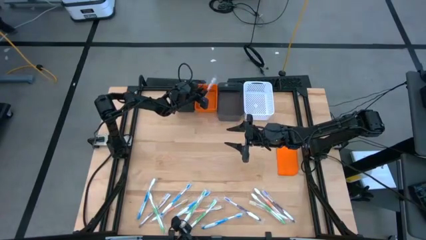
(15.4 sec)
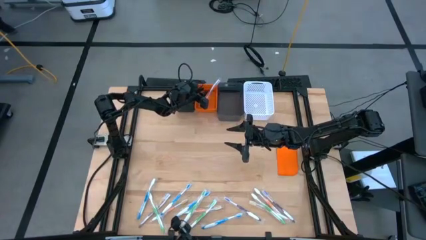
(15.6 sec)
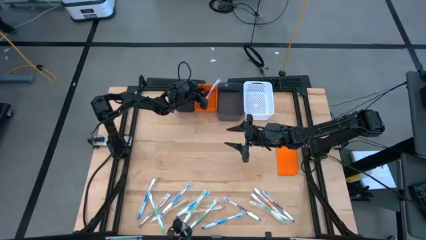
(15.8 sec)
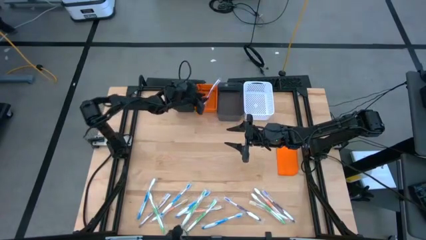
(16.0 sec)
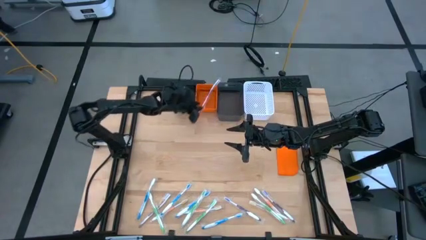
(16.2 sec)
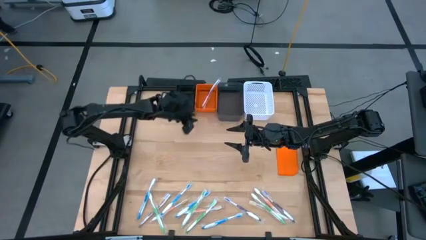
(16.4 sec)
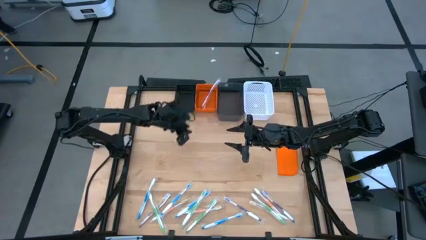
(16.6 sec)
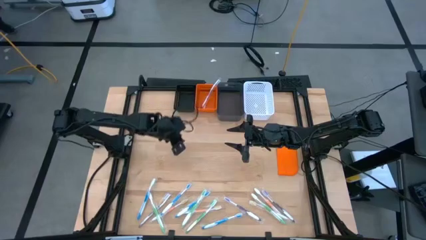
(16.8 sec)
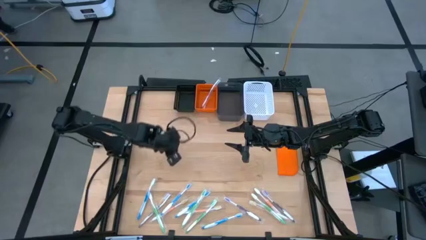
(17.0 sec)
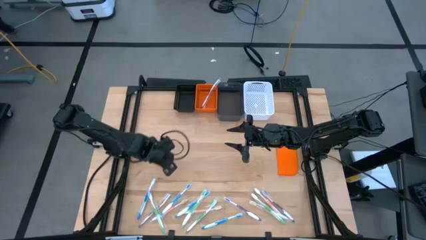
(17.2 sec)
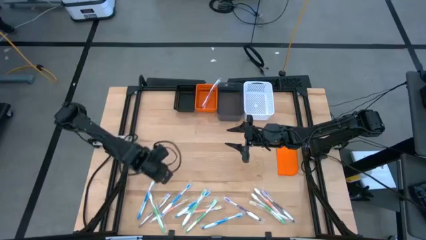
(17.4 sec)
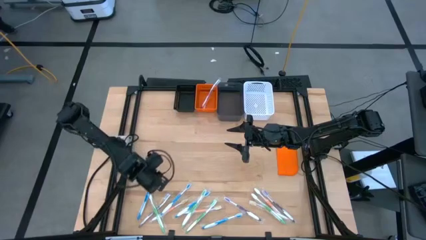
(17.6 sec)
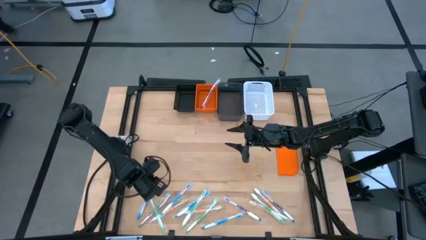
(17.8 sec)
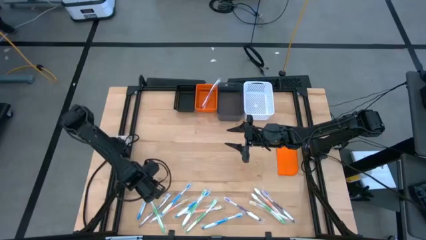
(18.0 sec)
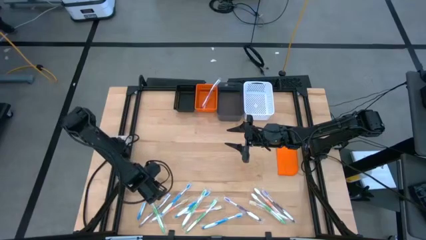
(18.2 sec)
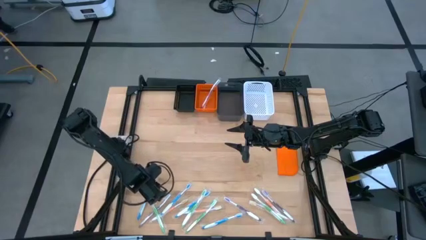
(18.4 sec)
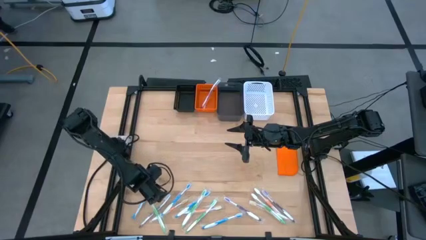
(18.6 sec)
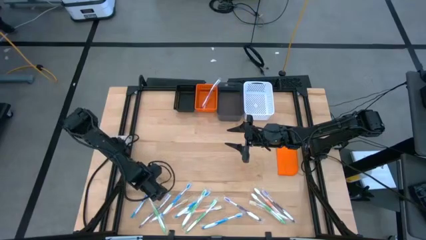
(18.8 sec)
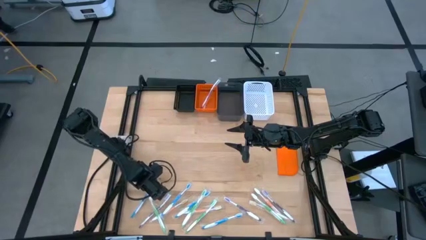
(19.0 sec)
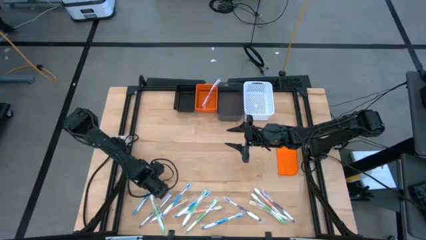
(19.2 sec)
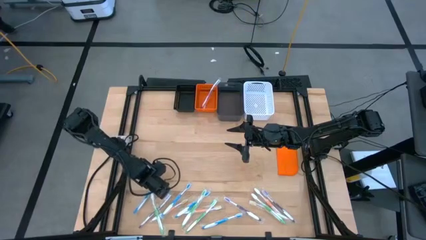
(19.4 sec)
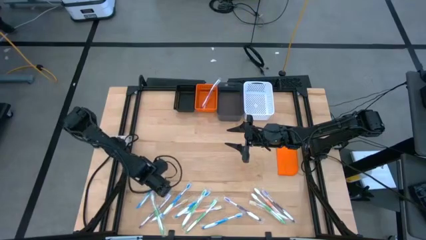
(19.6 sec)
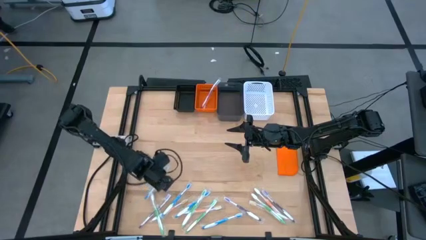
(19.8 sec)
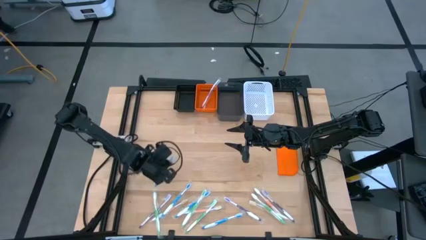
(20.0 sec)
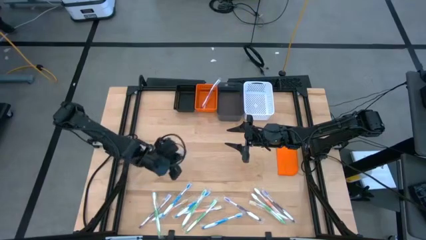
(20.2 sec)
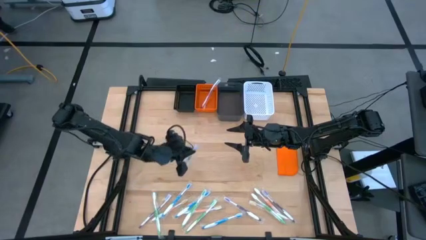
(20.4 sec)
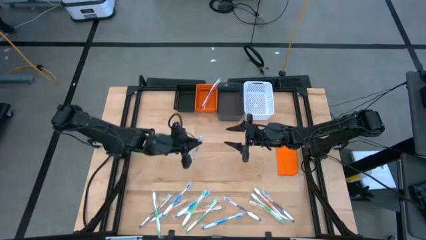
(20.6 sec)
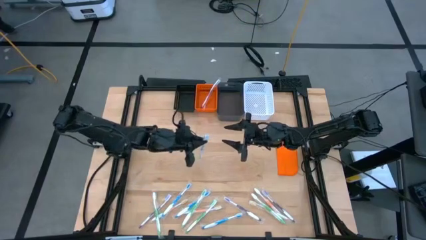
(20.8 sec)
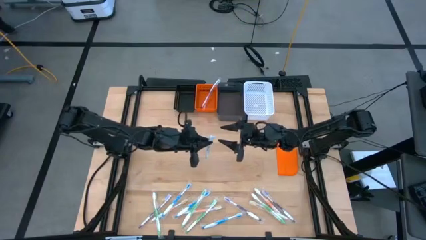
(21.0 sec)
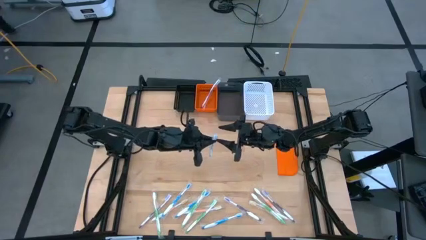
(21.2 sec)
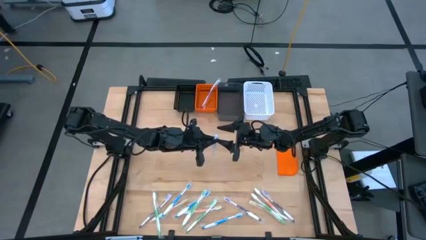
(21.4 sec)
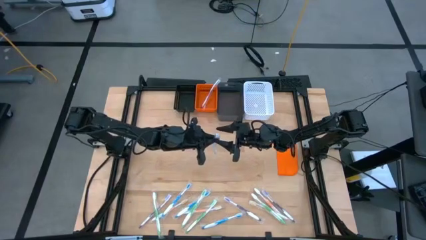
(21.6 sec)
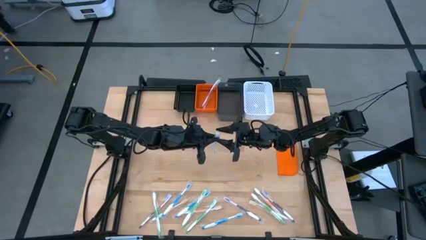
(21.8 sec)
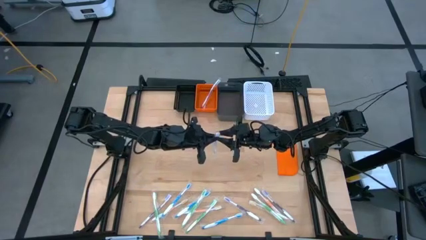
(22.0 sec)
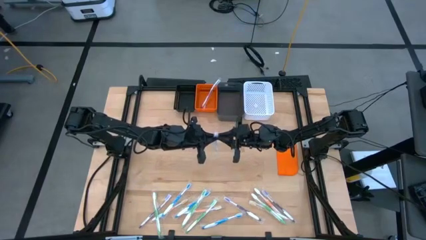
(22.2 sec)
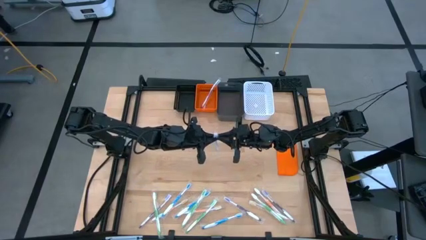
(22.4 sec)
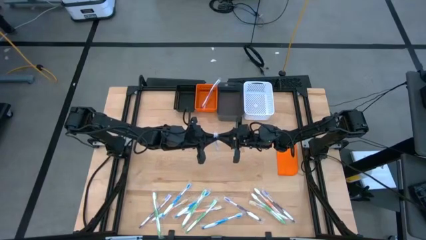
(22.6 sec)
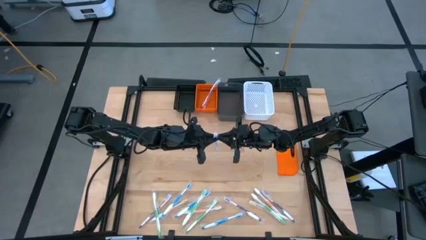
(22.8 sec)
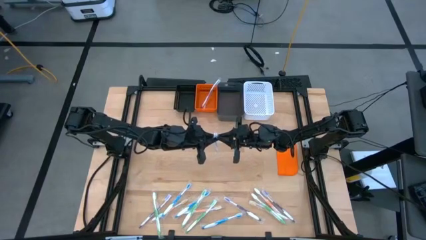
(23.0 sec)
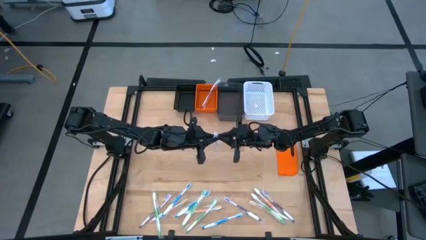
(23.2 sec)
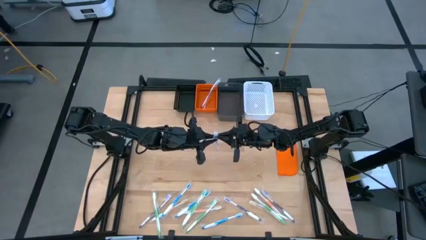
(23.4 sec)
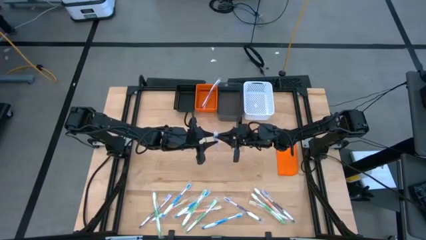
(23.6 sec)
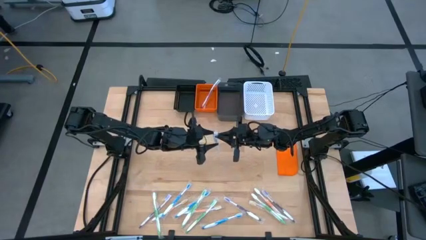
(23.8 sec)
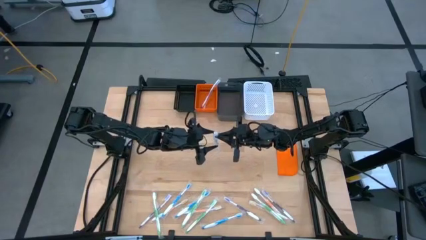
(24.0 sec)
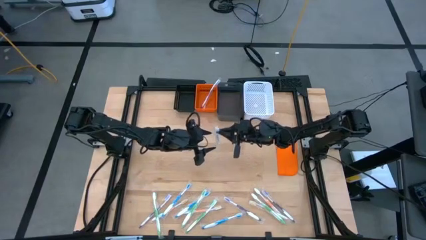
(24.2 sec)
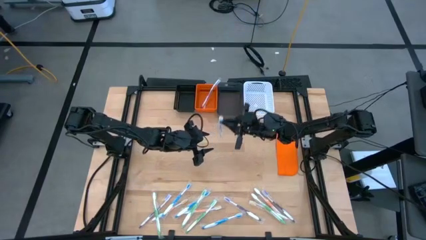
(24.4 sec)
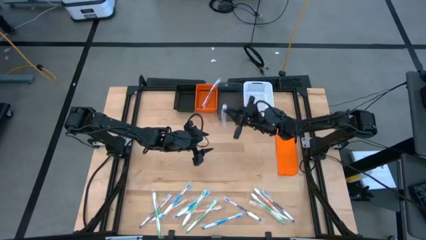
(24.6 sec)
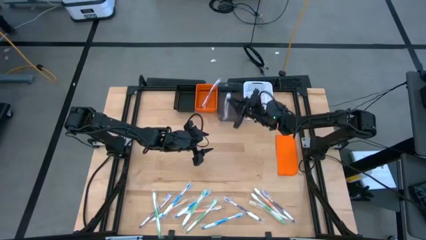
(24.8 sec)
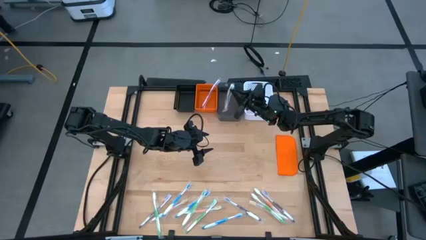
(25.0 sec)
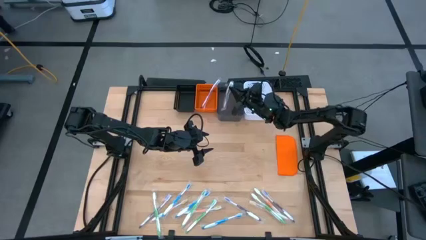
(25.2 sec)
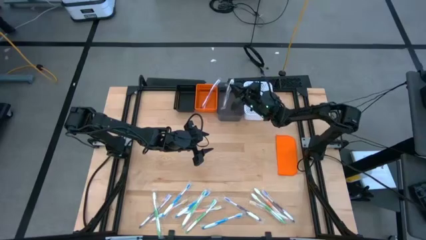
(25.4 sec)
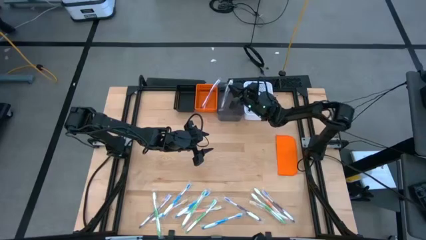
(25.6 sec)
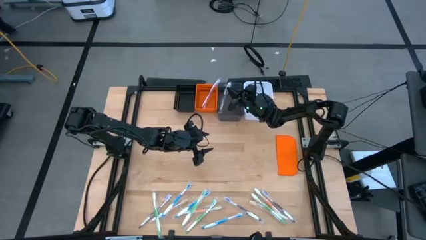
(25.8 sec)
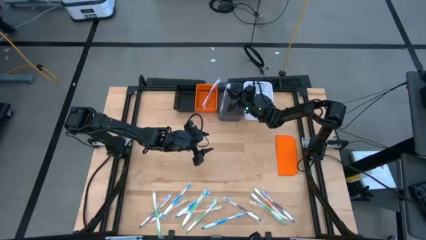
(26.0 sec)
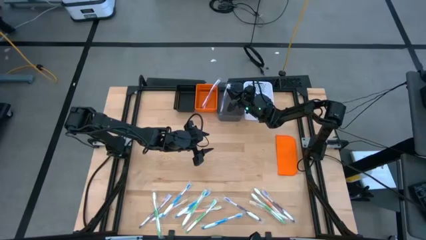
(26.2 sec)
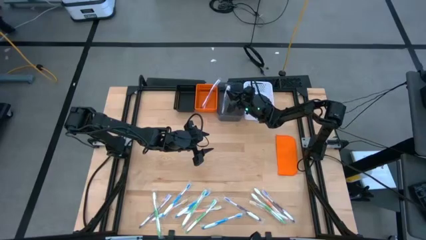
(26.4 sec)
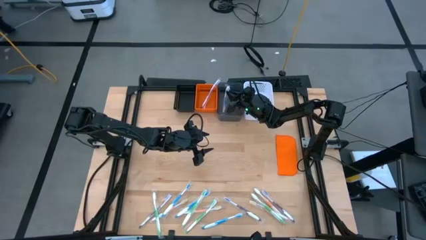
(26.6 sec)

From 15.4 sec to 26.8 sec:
Task: Pick & Place Toothbrushes
Put the blue toothbrush into the gray bin

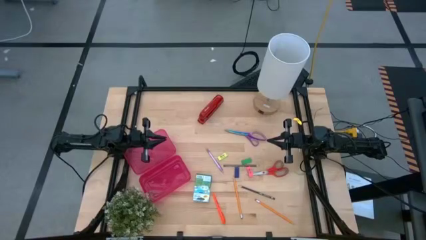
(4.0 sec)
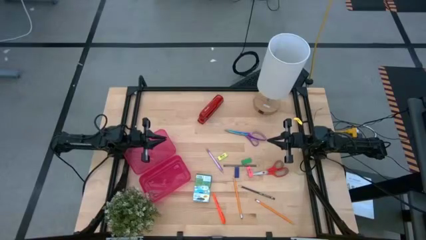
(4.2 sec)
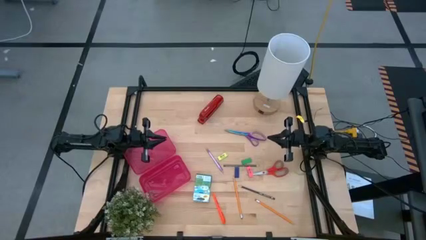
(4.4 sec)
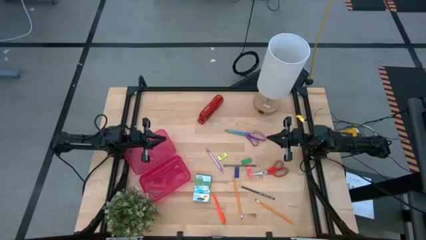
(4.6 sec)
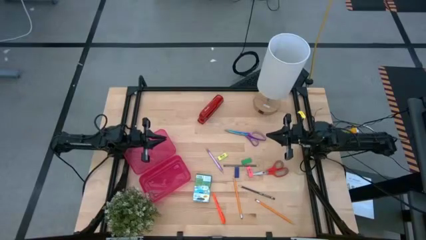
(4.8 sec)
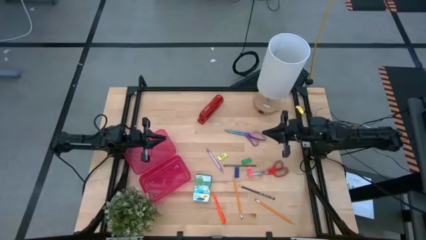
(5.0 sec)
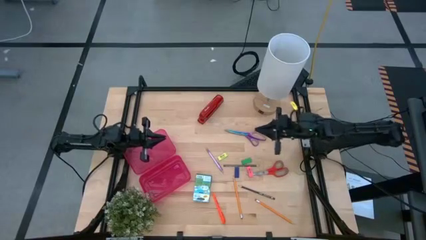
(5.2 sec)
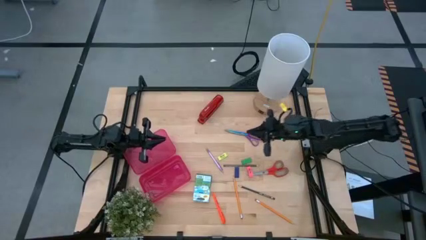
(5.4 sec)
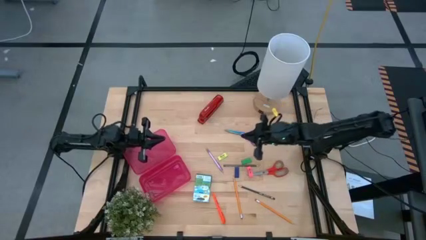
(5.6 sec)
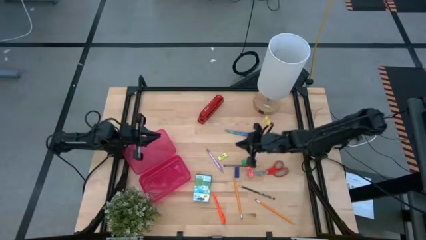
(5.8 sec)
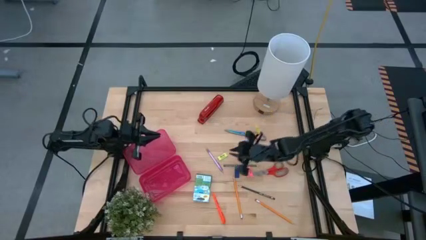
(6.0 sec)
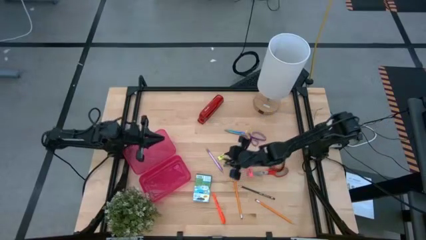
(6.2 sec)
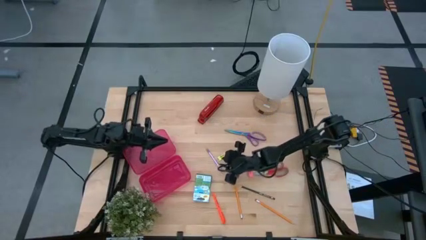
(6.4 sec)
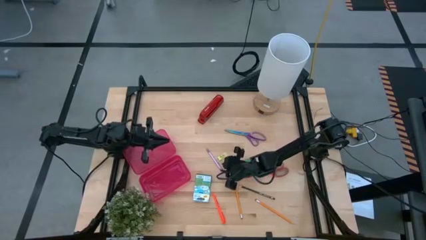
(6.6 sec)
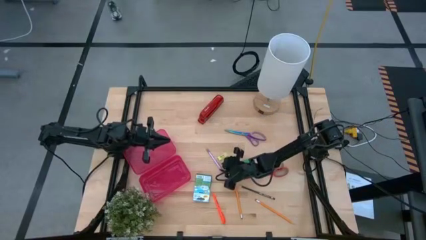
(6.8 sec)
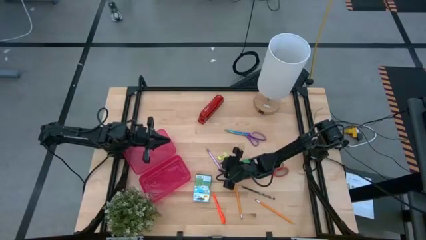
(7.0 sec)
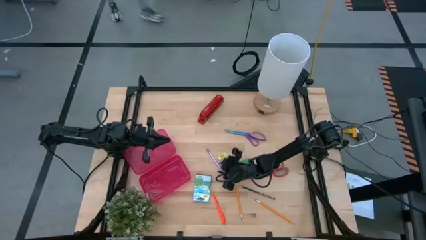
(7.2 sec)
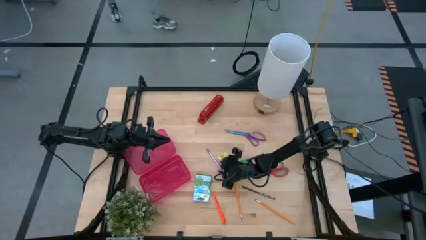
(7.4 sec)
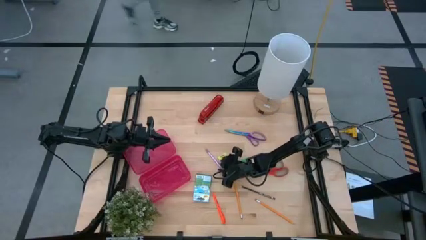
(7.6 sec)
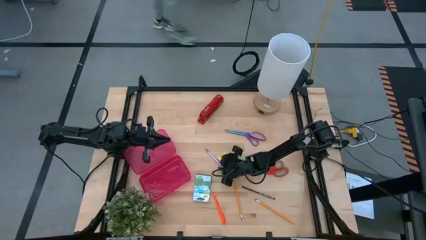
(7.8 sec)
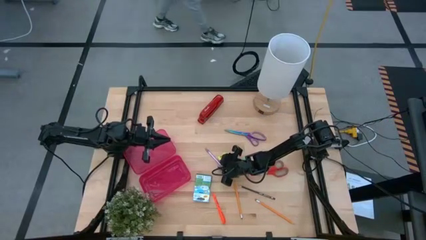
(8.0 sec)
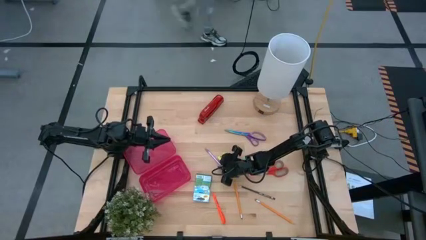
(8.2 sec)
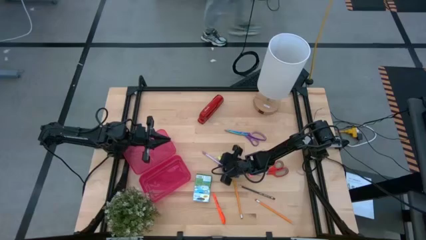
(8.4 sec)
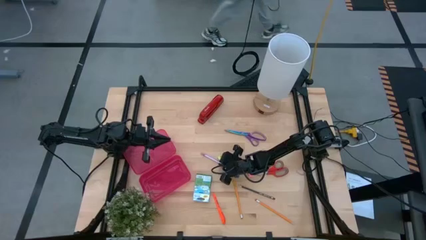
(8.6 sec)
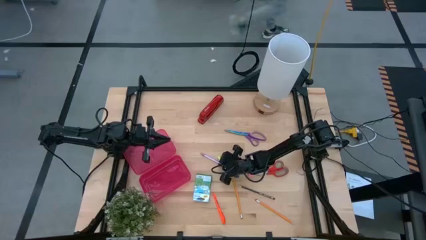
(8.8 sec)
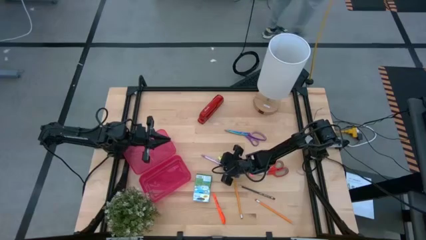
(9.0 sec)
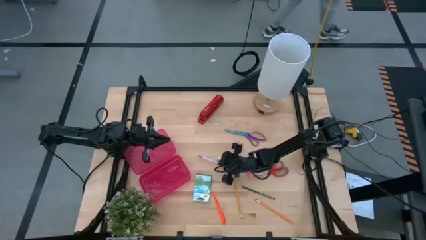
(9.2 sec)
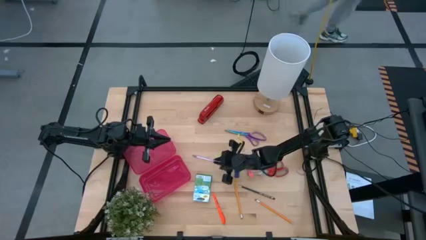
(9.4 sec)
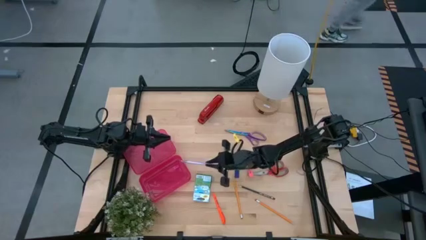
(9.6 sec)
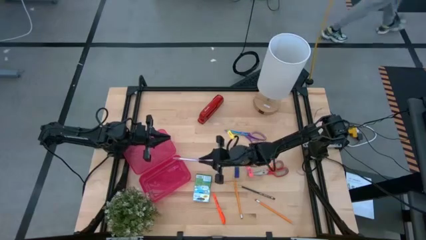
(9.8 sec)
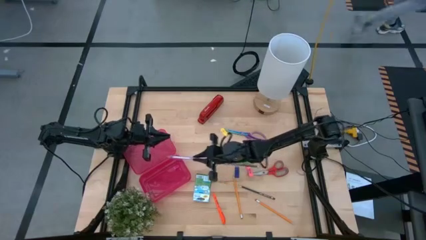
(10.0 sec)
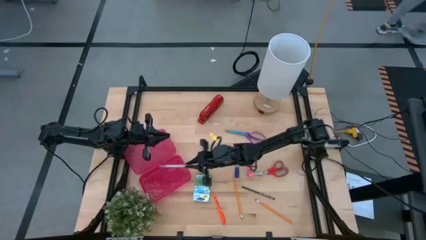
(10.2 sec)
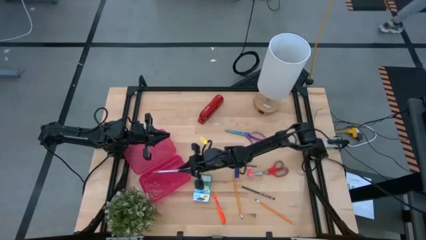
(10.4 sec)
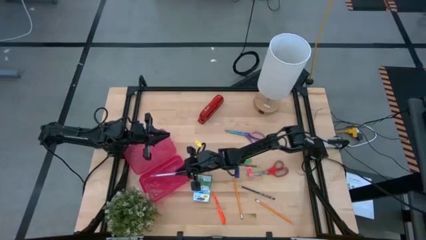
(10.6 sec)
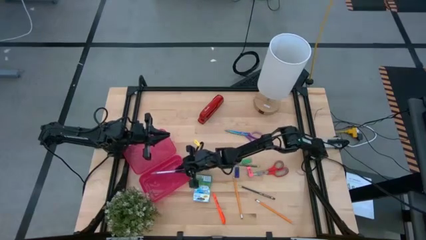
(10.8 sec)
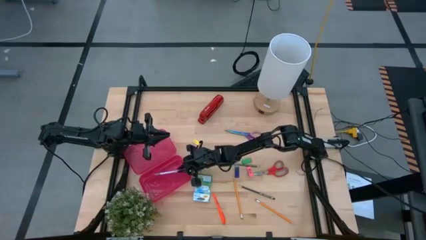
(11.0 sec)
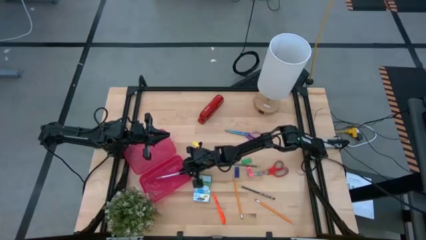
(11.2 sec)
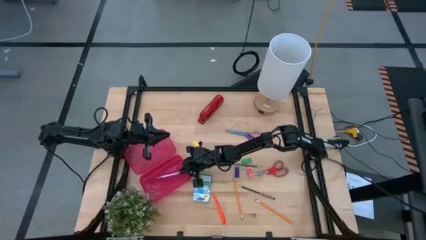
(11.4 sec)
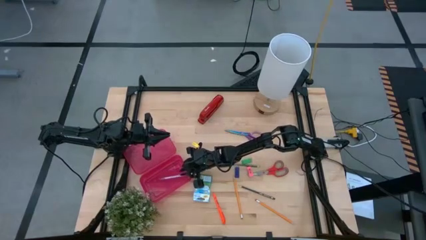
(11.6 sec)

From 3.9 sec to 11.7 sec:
Task: Pack school essentials
Put the purple pen into the red supply box
